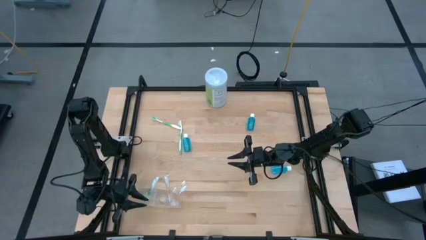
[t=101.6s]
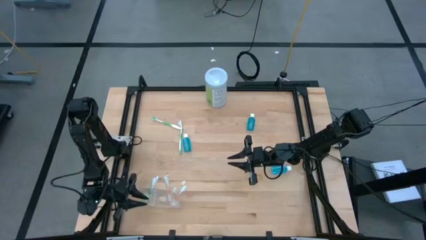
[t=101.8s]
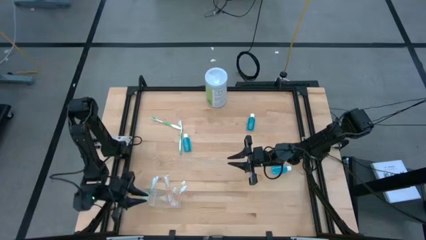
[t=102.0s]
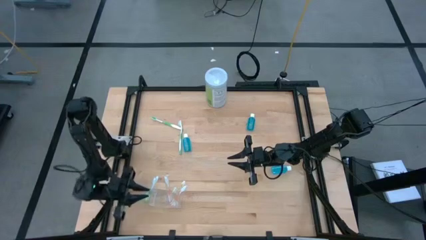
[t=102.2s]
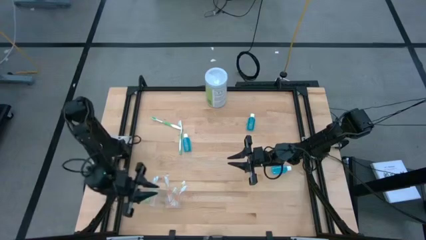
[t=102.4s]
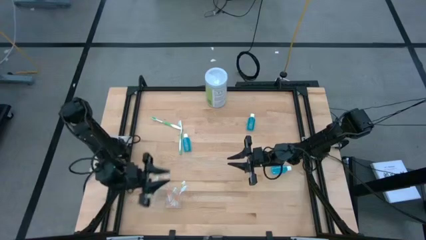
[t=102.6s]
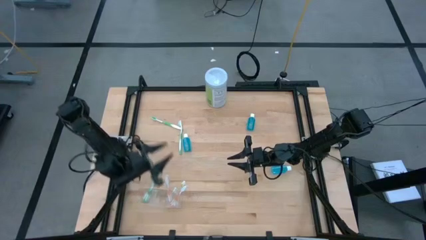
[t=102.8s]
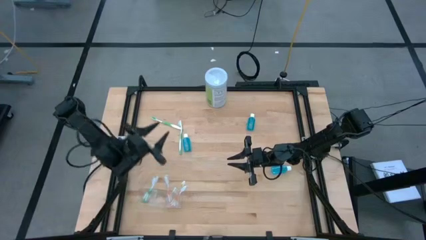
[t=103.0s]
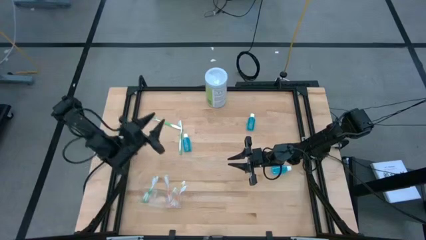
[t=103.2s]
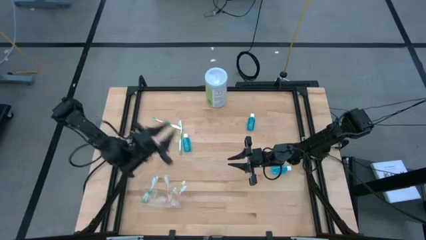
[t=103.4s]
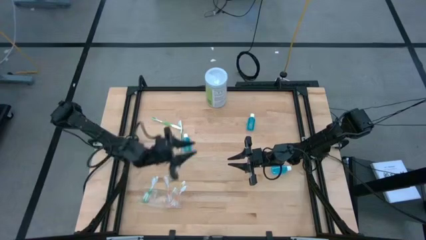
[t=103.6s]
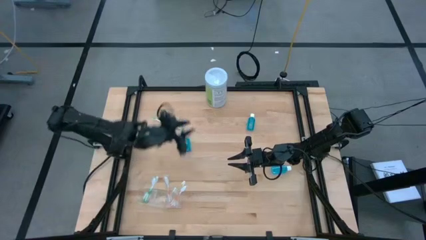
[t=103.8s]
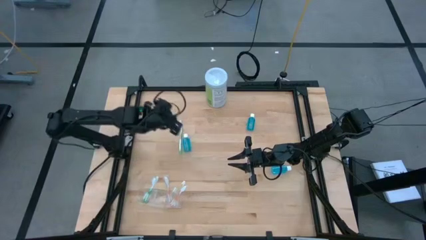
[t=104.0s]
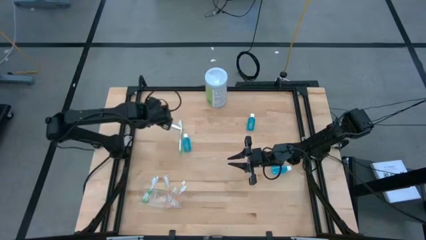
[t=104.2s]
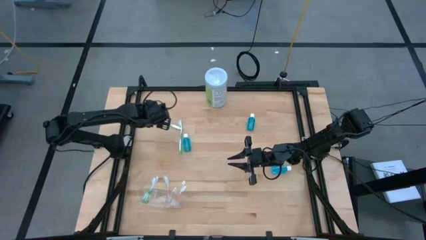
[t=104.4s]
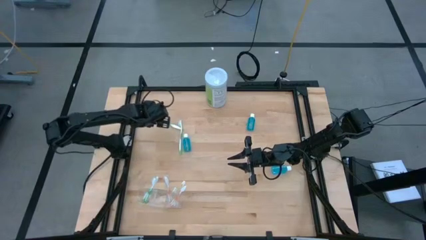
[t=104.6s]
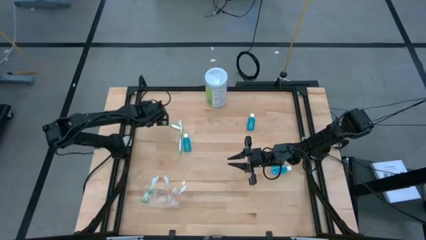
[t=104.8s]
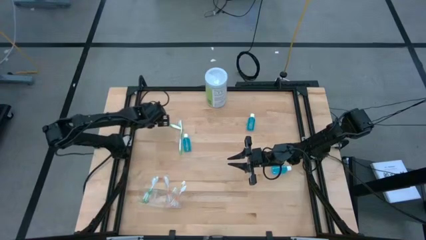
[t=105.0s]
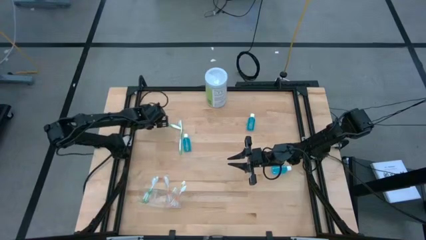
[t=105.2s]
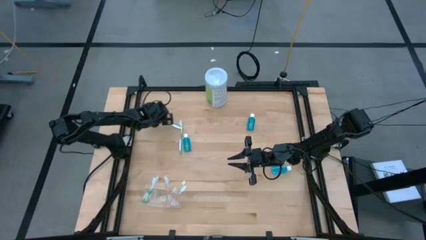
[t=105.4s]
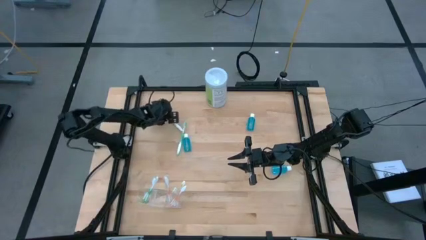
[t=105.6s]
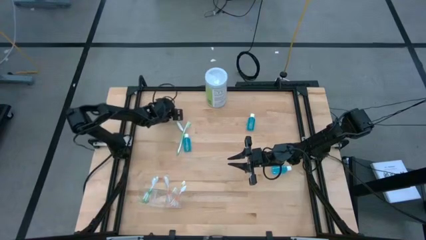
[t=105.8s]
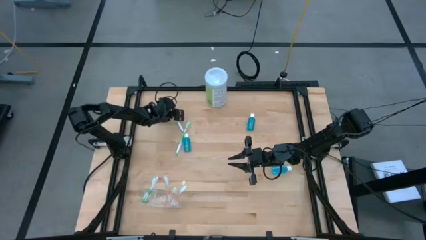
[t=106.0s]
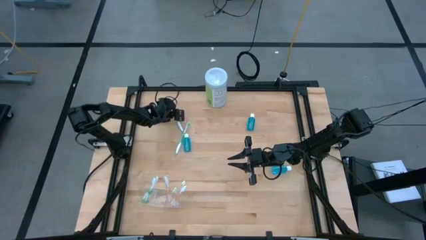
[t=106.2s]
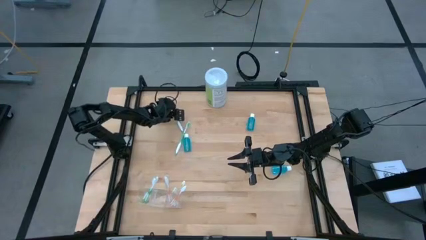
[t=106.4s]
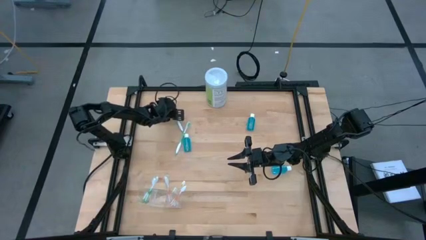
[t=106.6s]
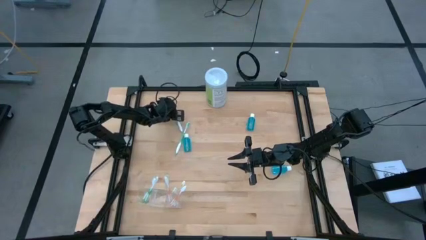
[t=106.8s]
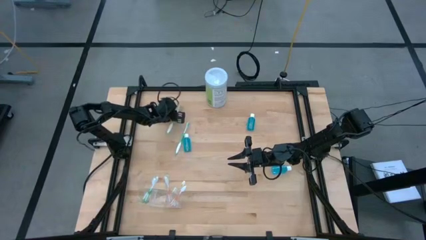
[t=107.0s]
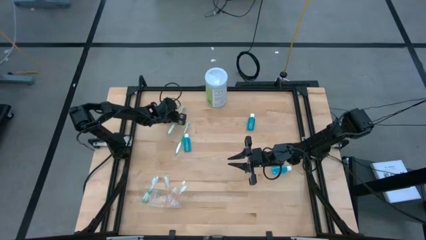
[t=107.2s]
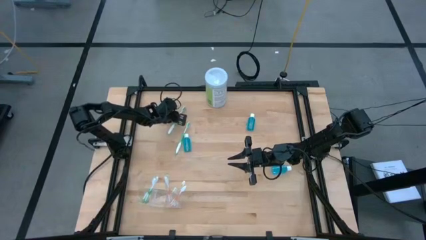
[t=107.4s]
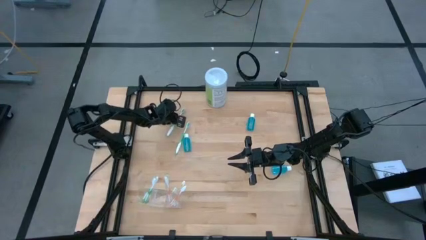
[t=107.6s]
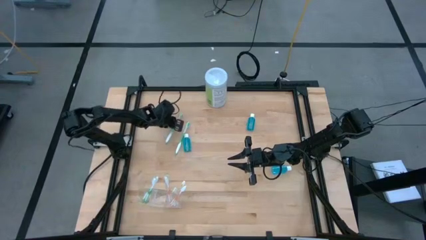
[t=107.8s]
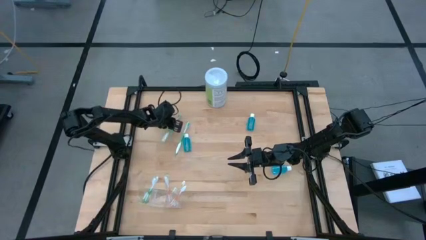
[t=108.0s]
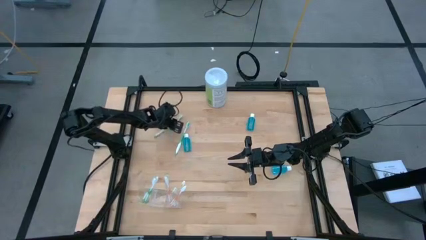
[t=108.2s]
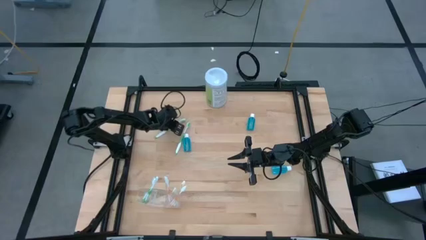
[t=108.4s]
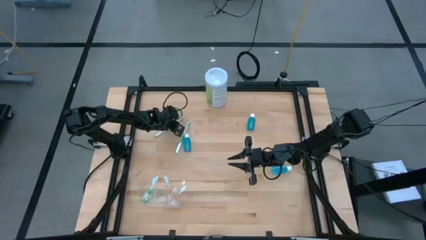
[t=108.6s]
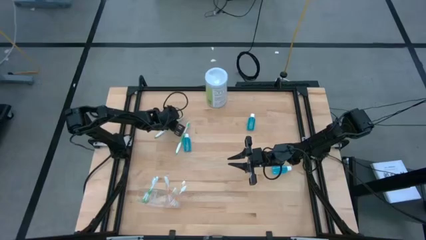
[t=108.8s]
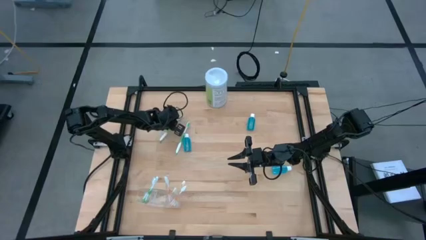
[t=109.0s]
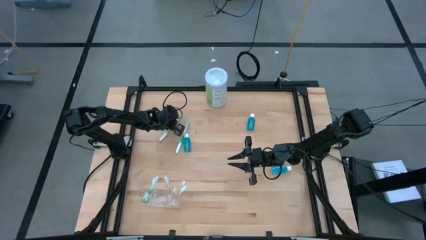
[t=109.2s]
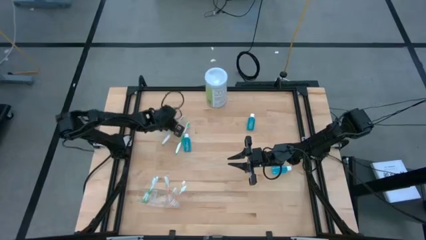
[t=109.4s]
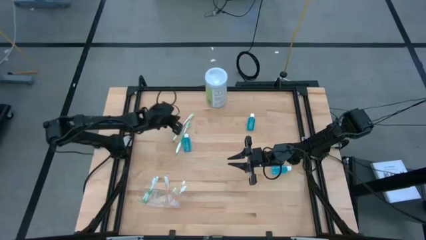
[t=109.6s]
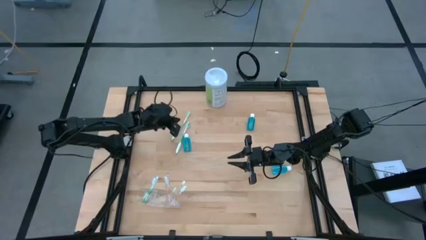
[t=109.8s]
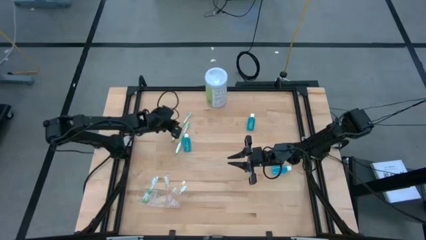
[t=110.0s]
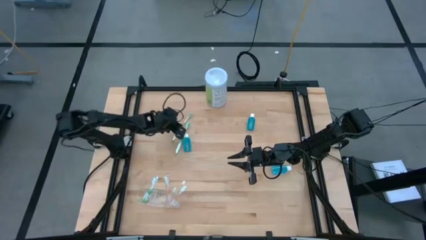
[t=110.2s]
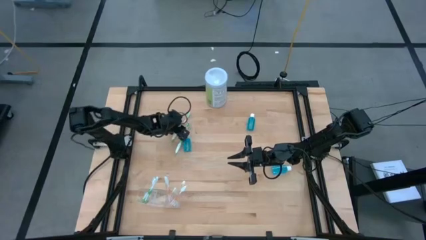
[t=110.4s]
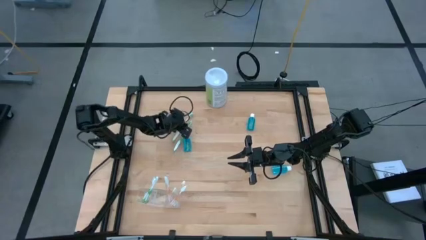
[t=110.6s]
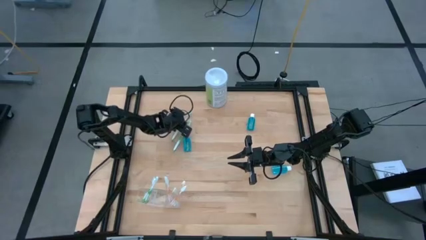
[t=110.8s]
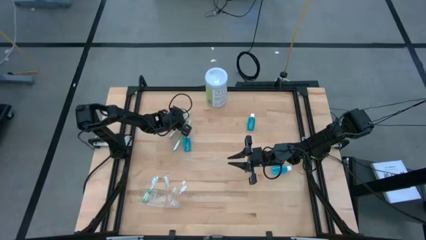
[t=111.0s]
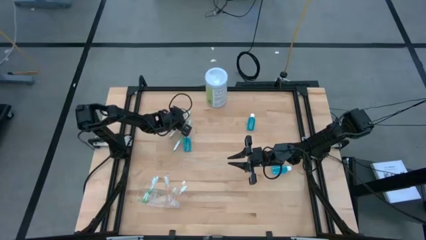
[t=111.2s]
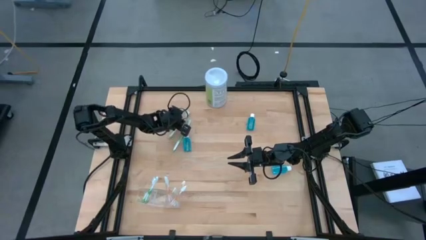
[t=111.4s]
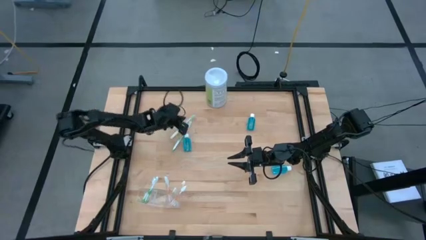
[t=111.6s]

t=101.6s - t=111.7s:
Task: Pick & Place toothbrushing station
Put the green toothbrush into the transparent organizer

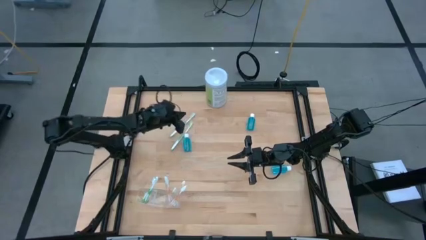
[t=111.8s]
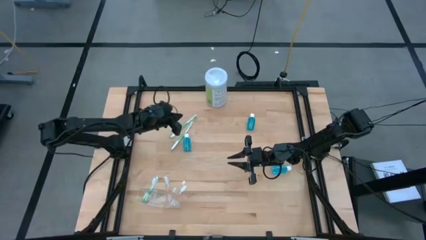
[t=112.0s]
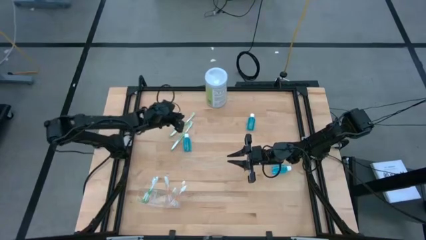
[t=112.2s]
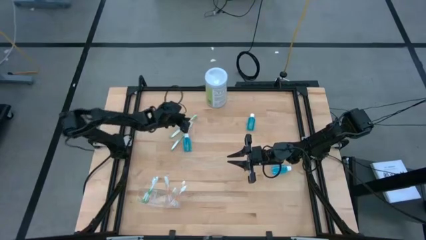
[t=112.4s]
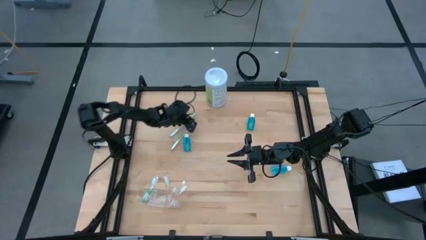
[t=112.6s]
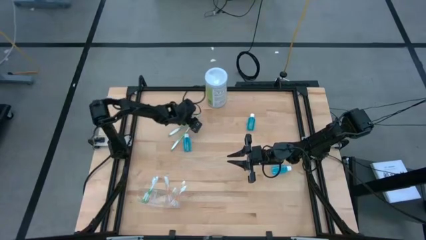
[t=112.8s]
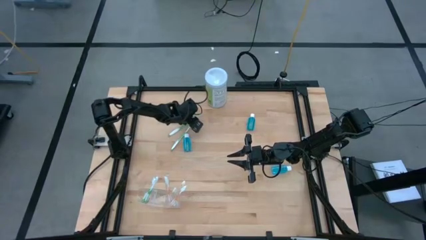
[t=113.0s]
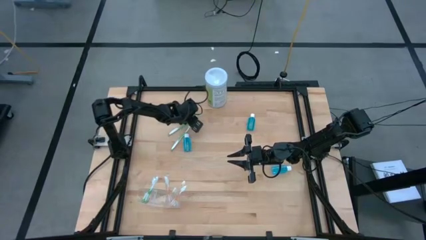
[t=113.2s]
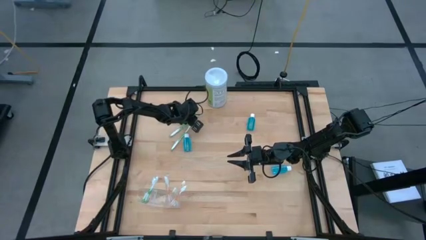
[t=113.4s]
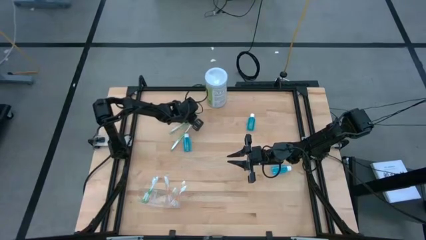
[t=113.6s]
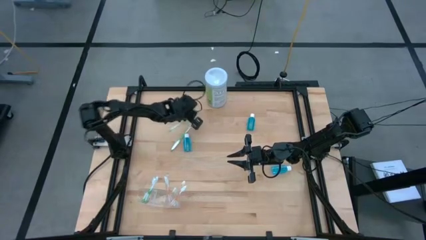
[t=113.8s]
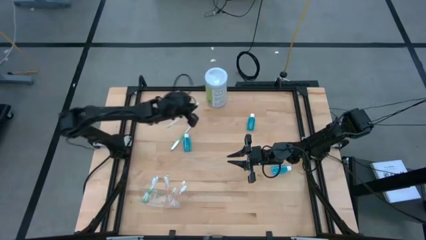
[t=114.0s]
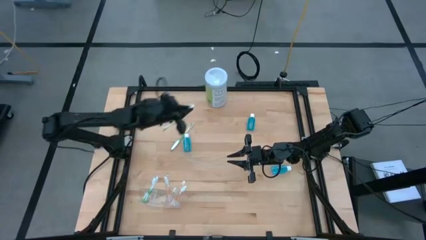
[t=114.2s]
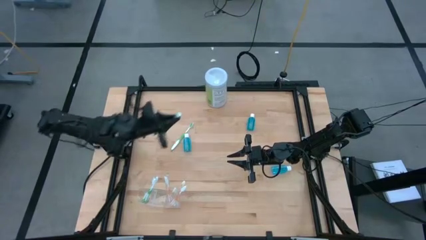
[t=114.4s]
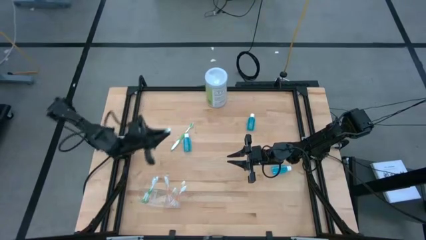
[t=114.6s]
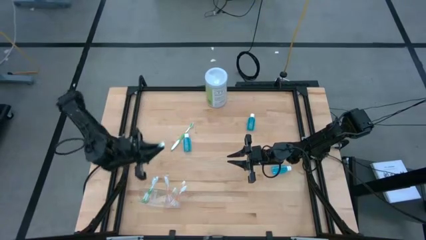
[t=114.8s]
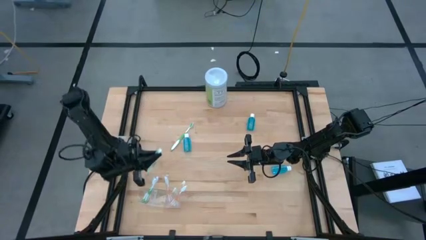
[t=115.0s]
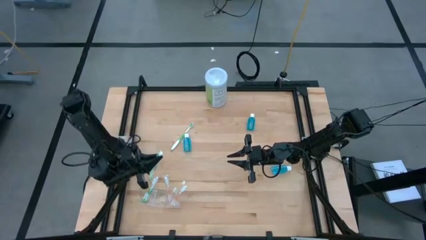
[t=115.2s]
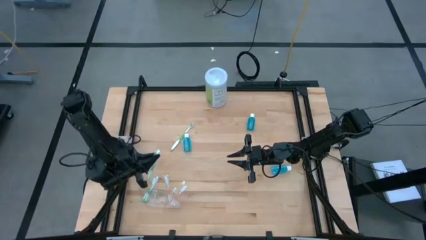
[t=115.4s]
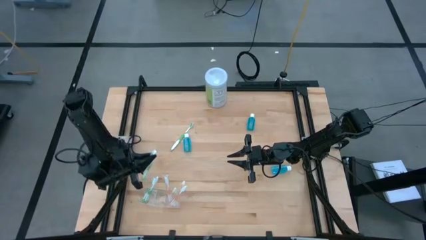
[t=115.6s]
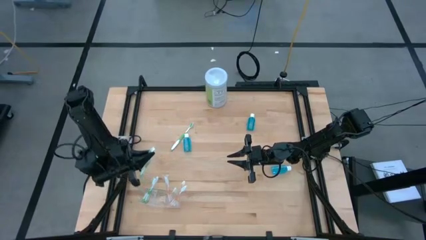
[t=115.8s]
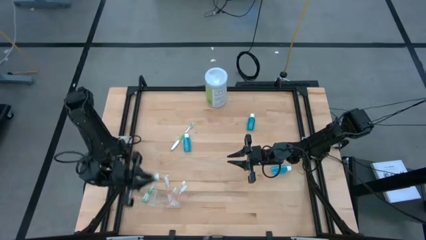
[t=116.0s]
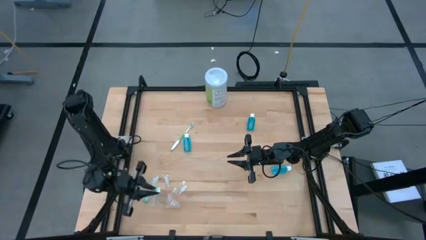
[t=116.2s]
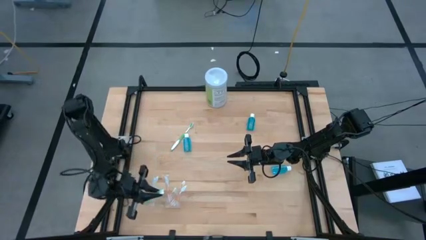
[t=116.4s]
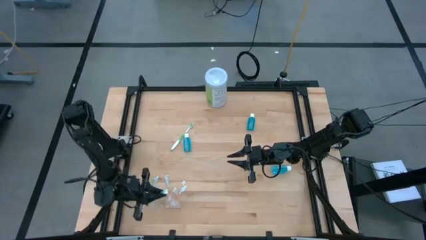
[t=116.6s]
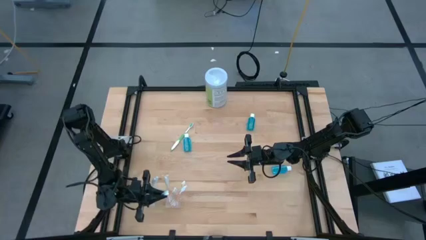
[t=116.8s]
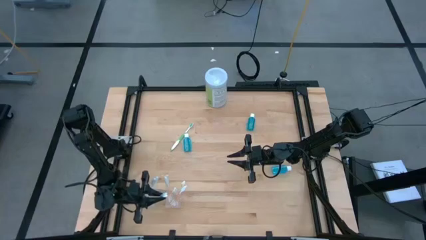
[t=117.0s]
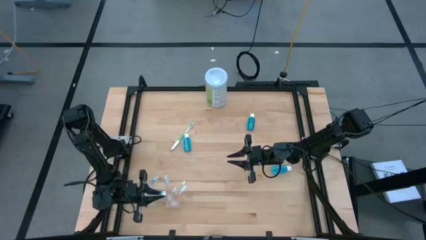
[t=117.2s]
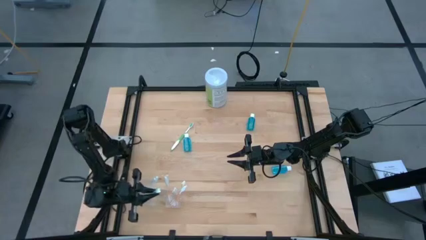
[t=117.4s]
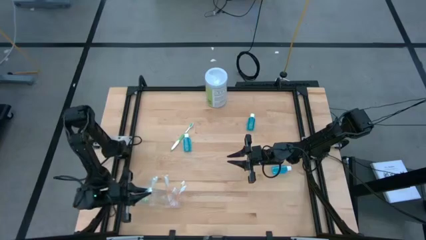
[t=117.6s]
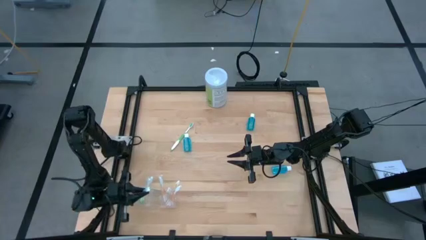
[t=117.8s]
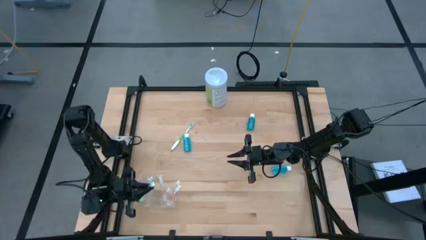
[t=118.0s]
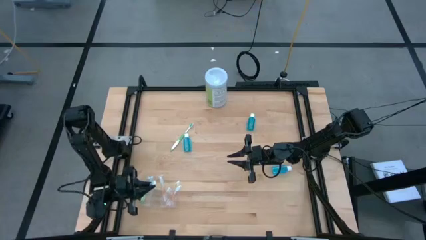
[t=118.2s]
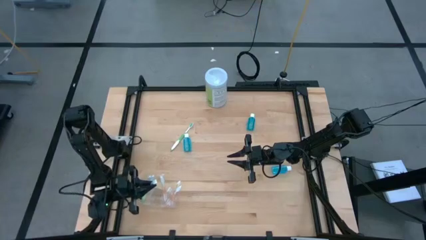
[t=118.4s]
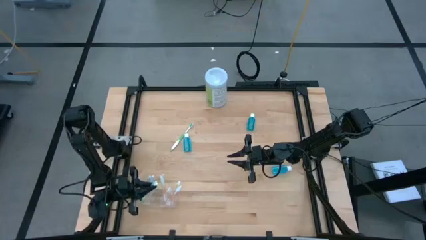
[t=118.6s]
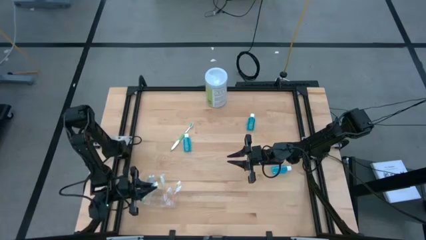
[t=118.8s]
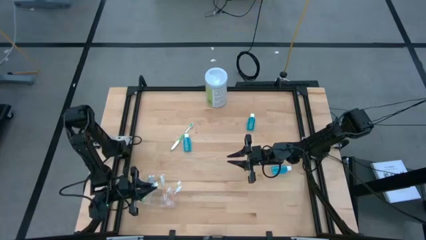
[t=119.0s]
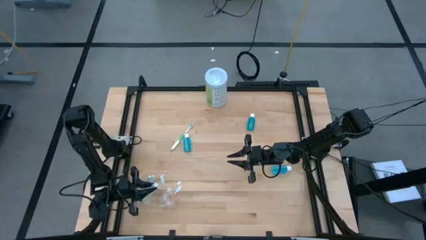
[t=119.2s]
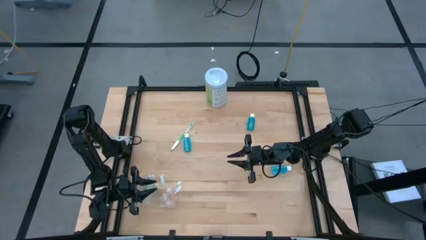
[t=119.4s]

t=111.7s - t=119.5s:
Put the green toothbrush into the transparent organizer
